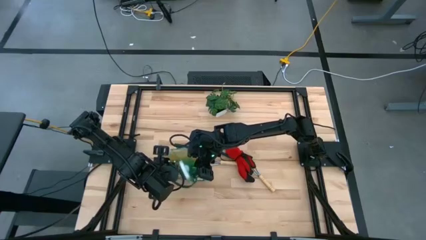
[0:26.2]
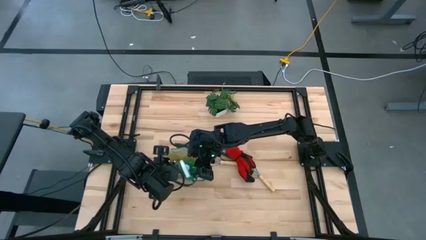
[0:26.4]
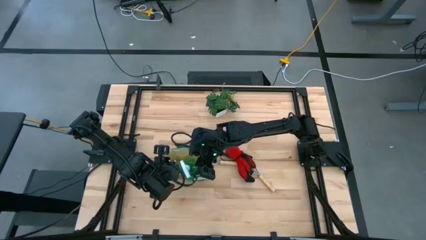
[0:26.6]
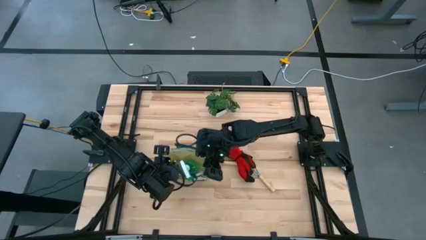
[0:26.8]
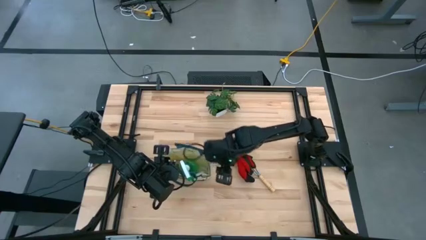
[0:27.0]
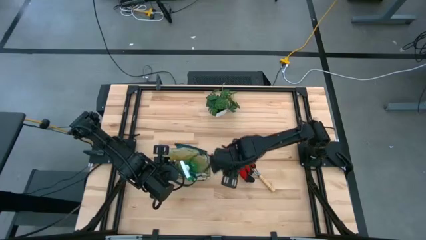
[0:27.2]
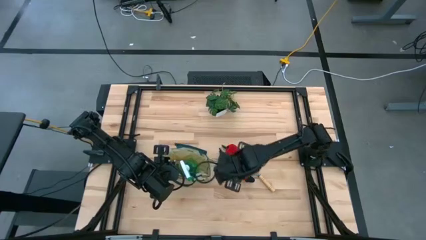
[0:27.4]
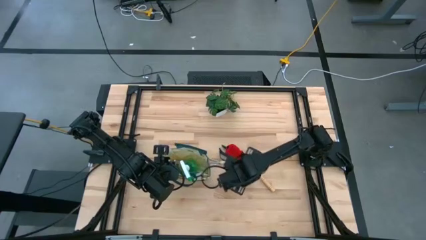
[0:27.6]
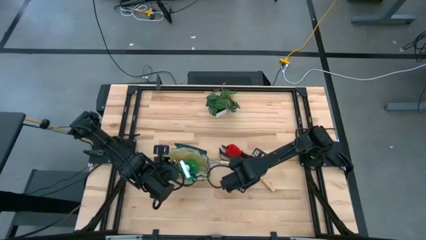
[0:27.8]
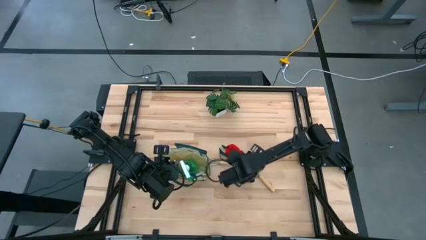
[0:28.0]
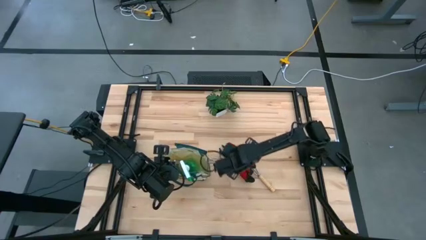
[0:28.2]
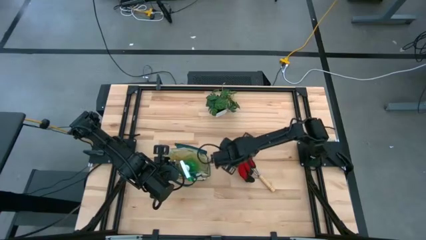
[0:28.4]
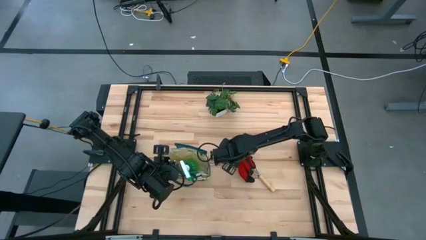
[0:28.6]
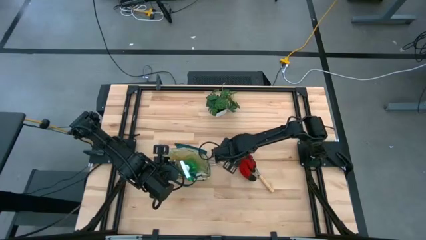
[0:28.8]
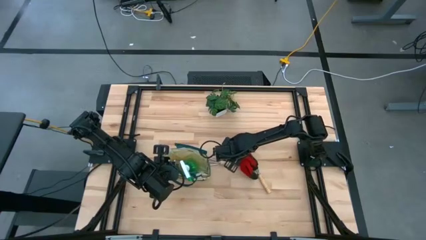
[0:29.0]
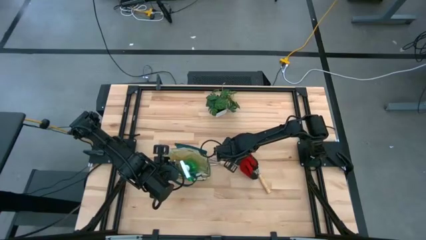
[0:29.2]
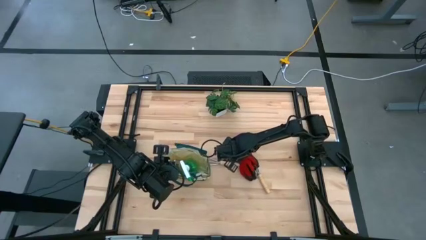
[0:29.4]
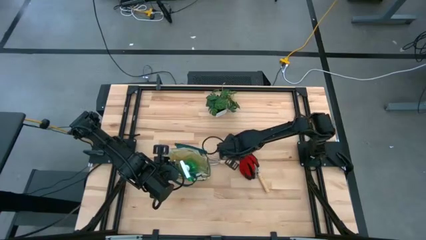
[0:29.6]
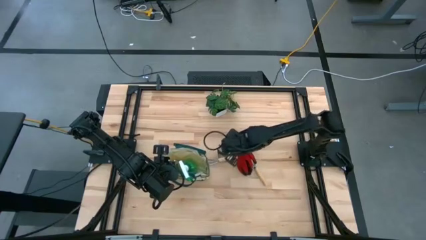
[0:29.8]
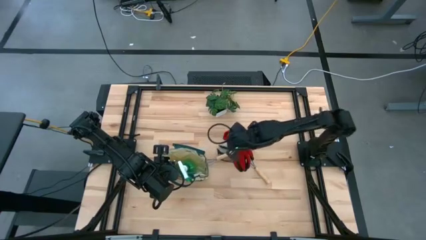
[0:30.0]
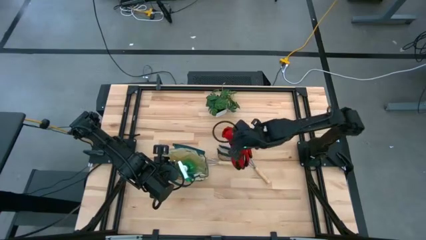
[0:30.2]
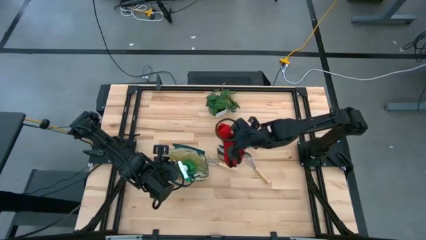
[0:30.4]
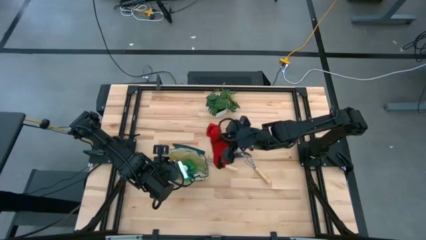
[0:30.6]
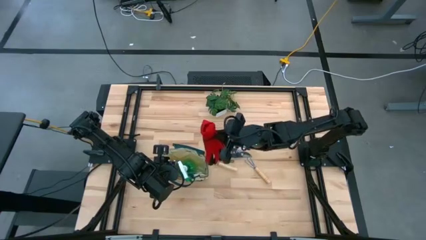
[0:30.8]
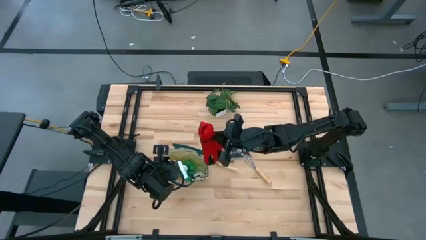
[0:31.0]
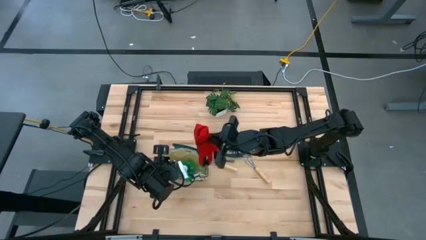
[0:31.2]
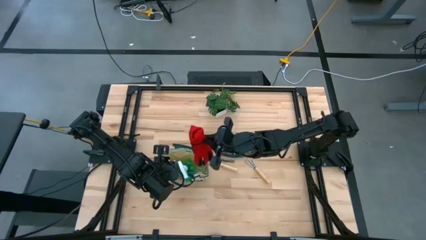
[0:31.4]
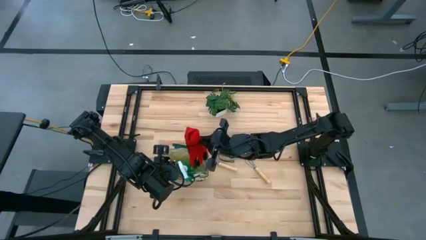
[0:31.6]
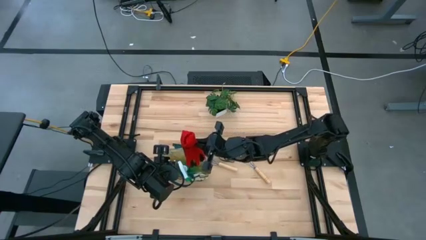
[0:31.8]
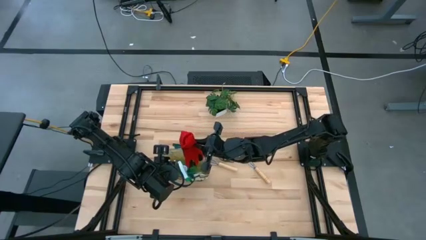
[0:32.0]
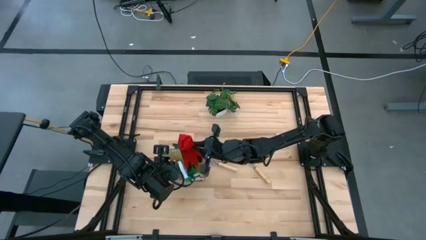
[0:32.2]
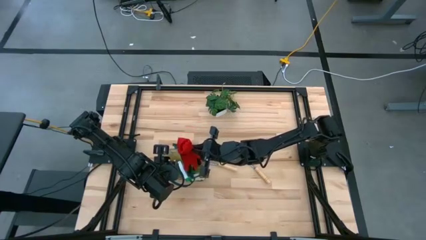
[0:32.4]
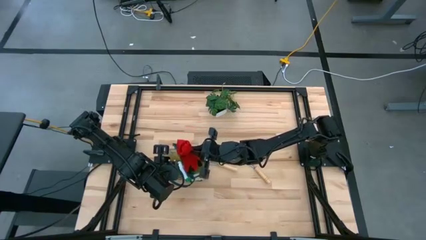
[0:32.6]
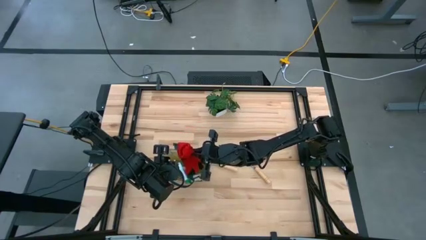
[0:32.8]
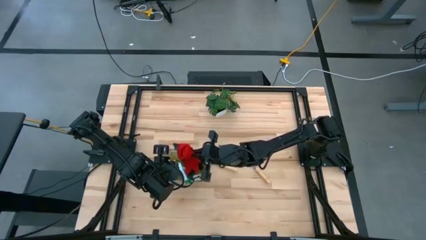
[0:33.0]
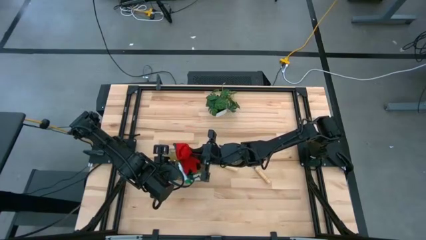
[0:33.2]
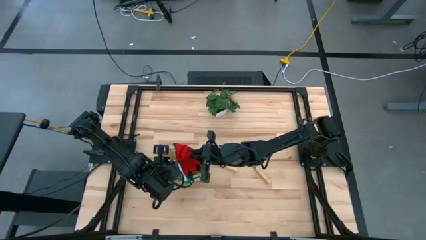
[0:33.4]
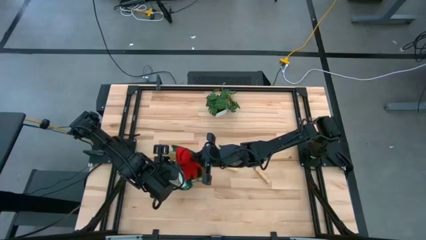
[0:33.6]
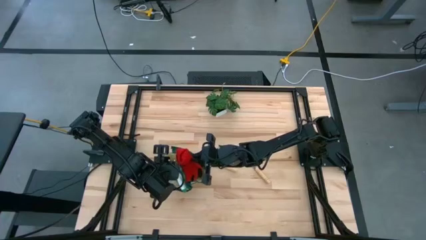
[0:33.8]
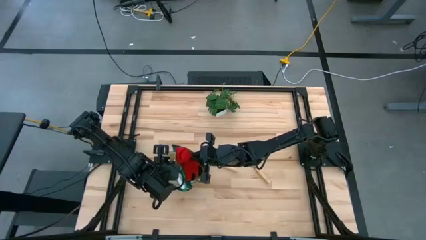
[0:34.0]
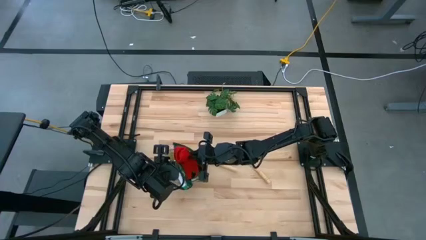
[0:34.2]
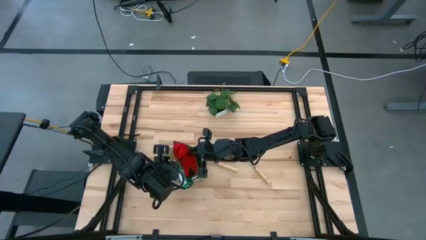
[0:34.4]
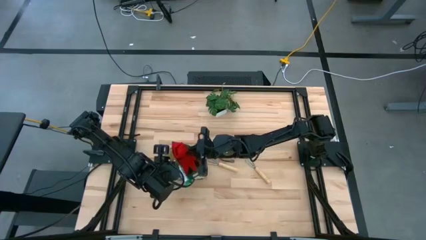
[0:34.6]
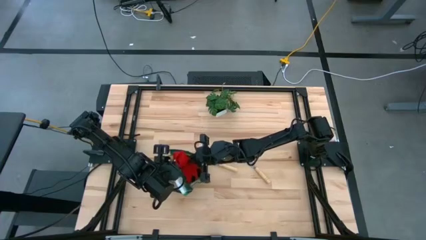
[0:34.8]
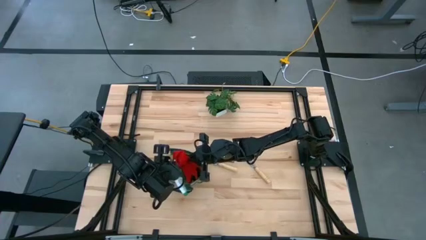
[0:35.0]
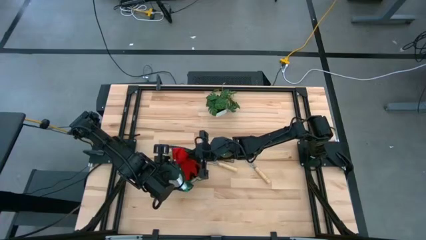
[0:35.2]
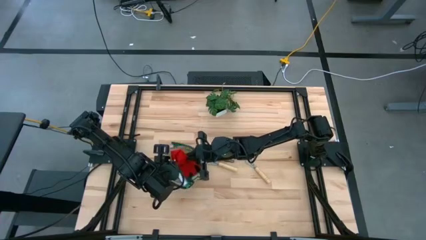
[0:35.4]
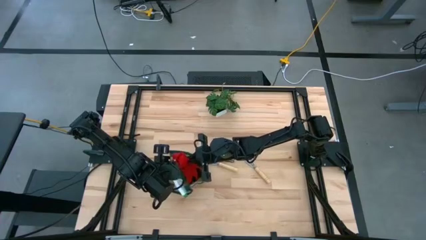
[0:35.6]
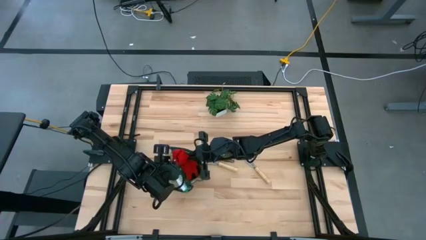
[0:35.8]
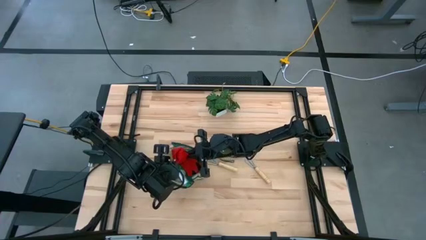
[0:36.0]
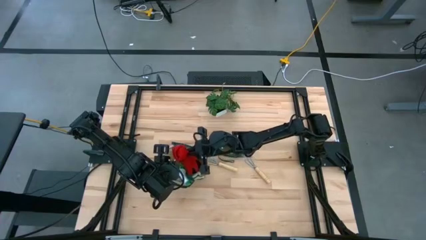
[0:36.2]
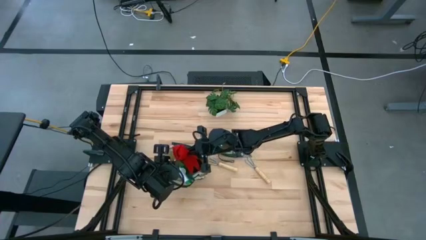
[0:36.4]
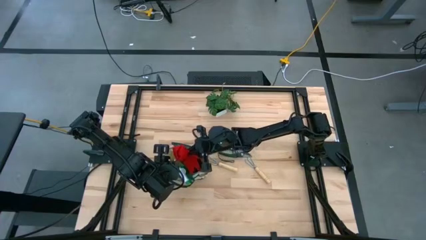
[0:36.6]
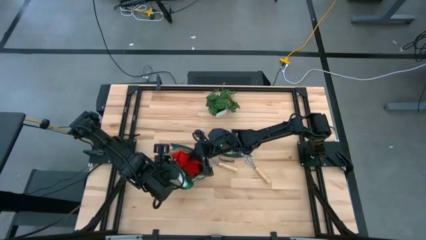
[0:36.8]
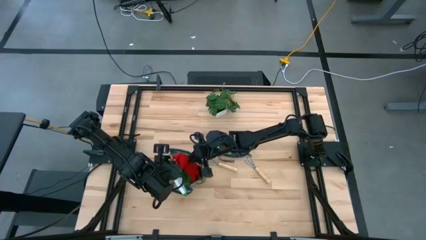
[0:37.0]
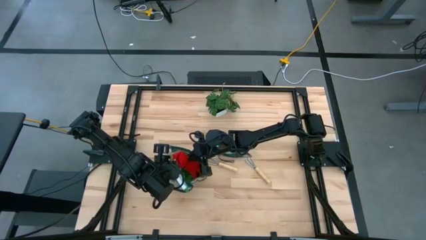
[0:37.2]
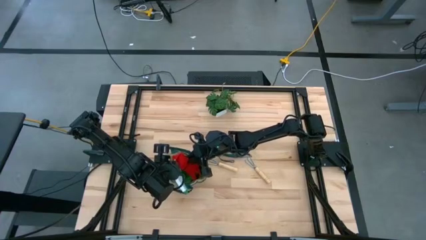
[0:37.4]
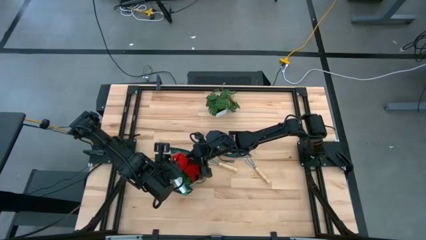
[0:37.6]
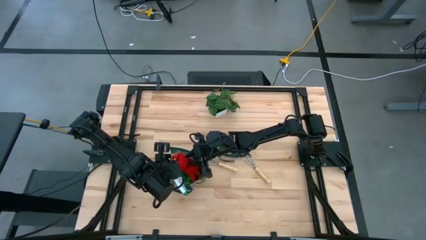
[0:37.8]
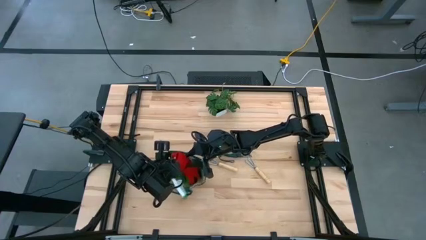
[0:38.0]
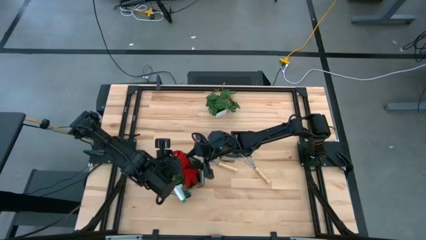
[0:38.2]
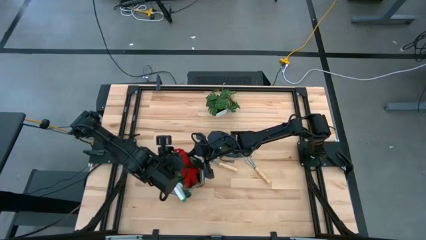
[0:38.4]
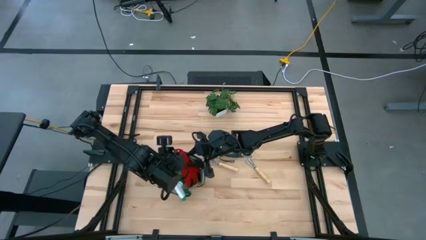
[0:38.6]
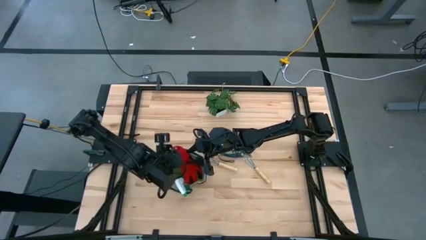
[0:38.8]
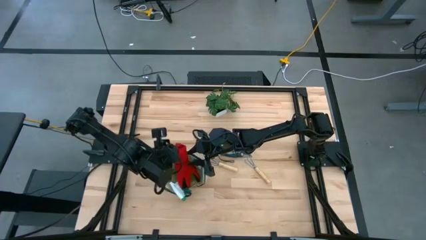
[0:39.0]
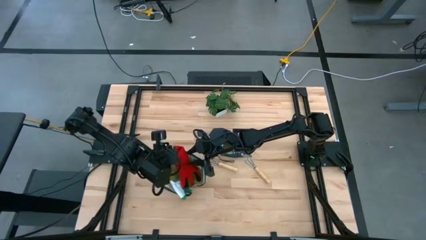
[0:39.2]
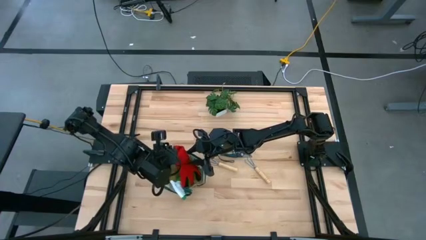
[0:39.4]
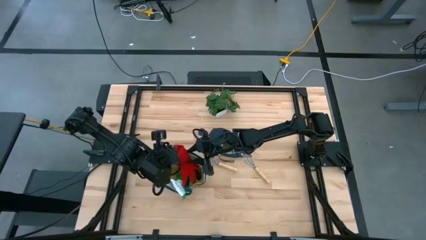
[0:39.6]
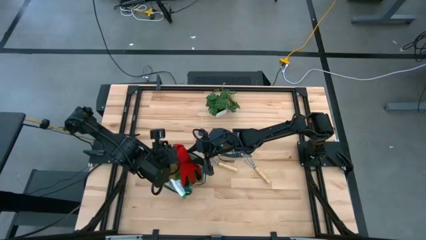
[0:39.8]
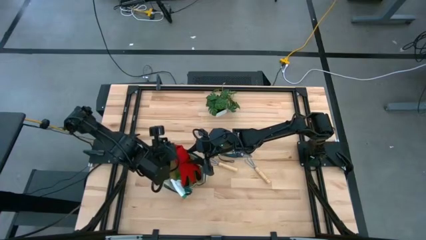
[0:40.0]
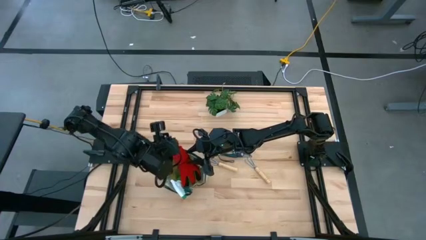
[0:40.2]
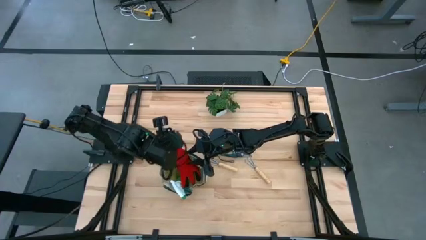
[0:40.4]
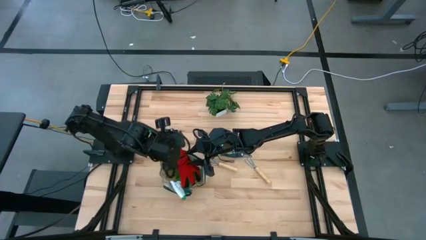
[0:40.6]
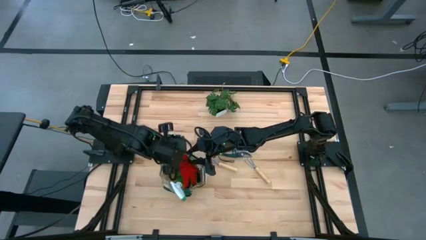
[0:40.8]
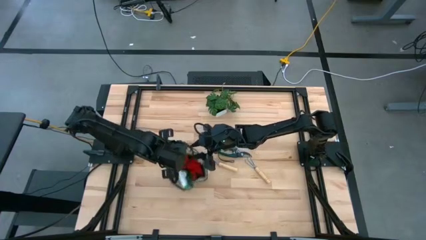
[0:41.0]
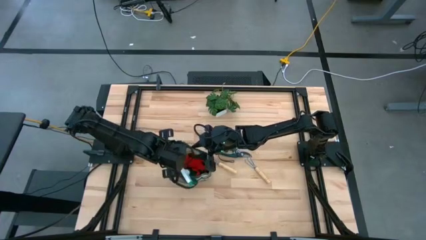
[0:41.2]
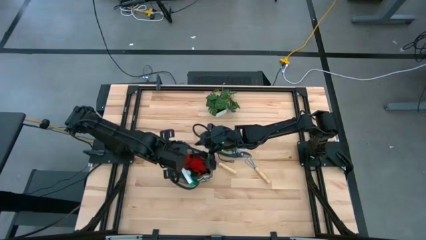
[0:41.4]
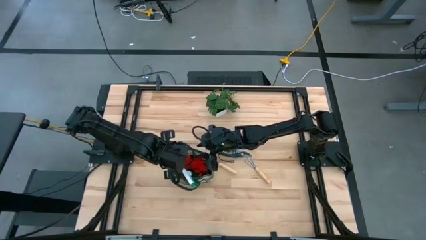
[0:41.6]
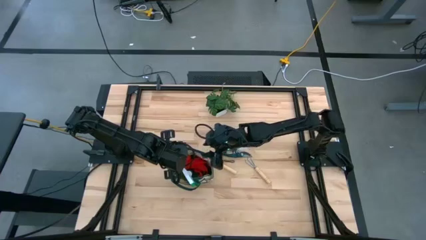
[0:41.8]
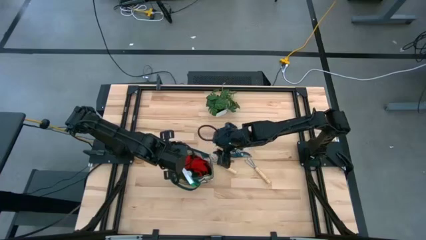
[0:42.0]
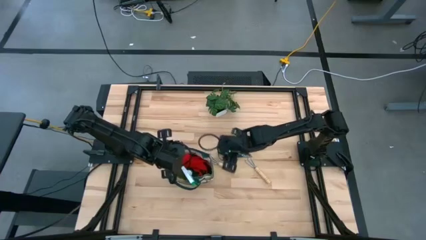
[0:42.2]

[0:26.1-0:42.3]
Task: Pick & Place Garden tools in Gardening bag
Put the red gloves into the green gardening bag
